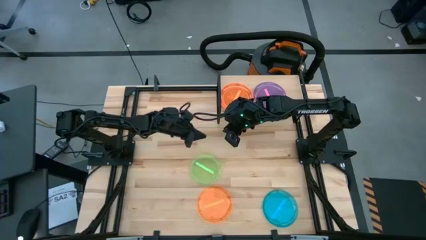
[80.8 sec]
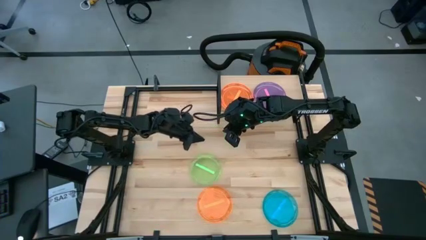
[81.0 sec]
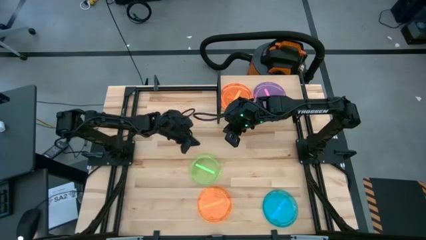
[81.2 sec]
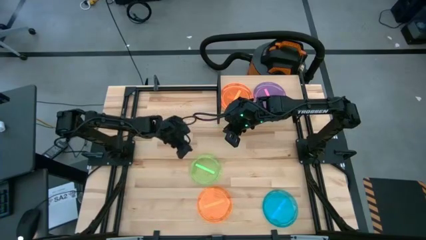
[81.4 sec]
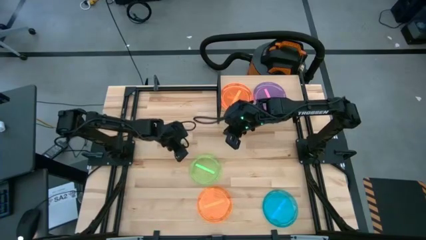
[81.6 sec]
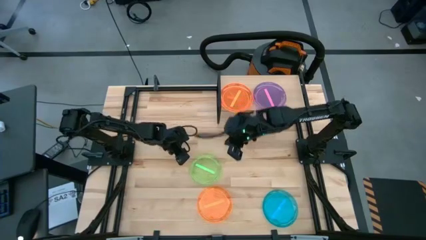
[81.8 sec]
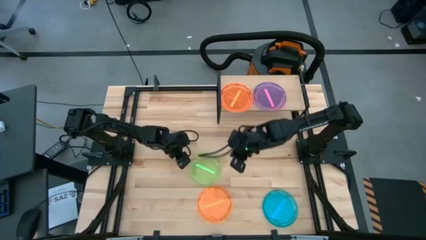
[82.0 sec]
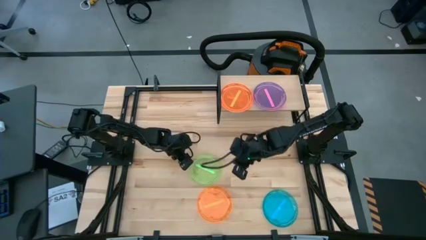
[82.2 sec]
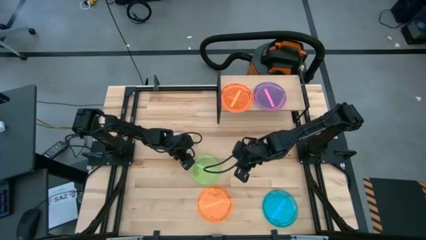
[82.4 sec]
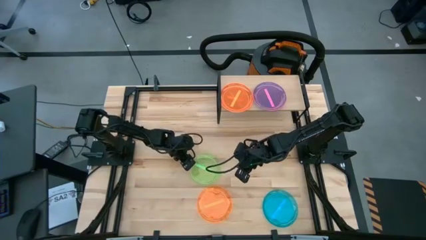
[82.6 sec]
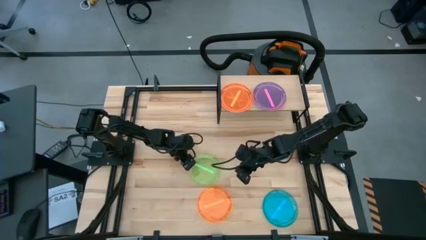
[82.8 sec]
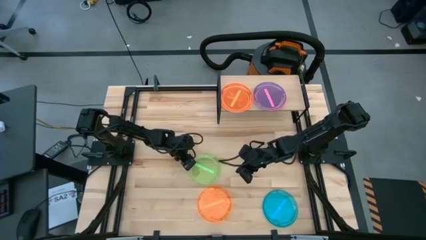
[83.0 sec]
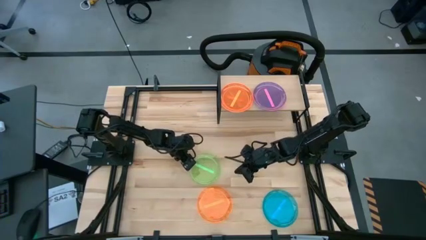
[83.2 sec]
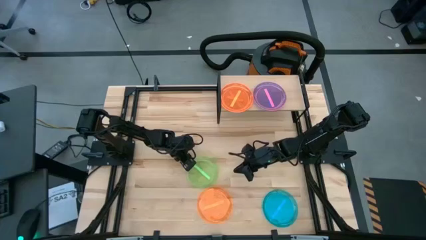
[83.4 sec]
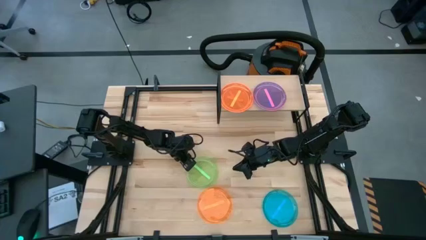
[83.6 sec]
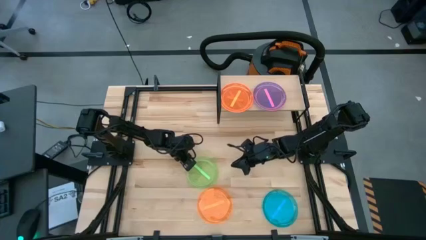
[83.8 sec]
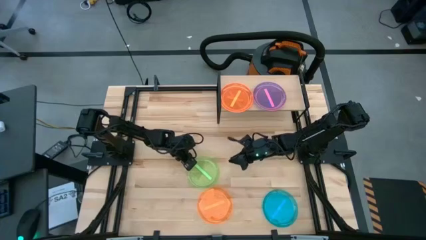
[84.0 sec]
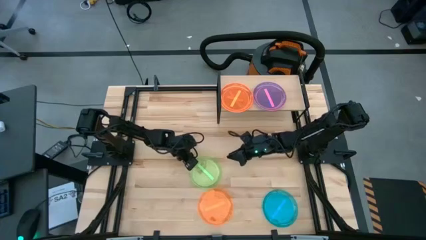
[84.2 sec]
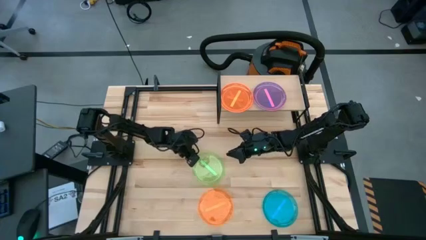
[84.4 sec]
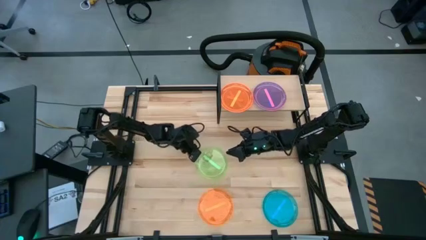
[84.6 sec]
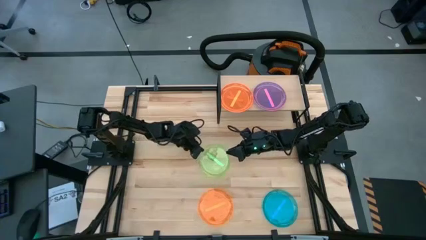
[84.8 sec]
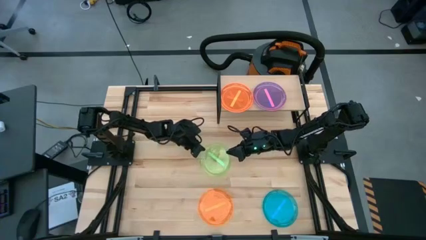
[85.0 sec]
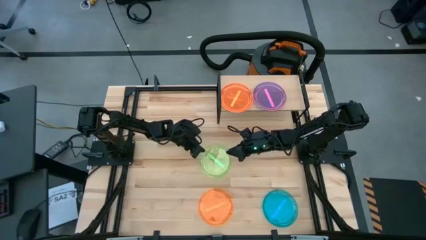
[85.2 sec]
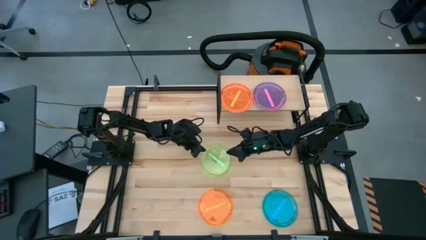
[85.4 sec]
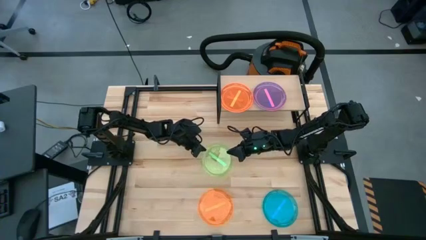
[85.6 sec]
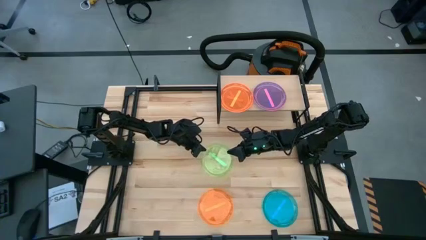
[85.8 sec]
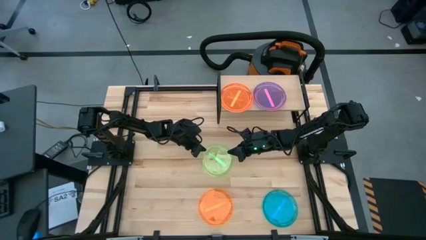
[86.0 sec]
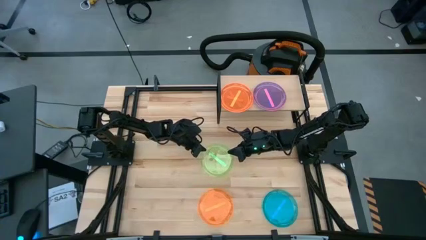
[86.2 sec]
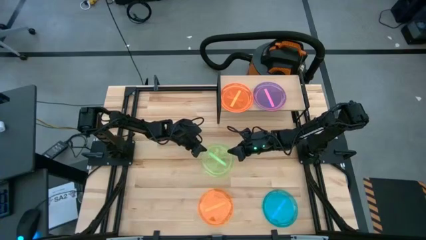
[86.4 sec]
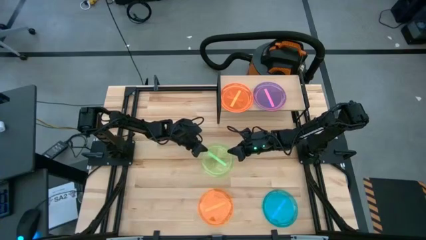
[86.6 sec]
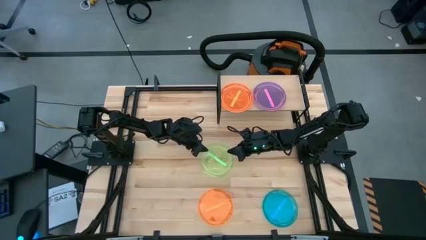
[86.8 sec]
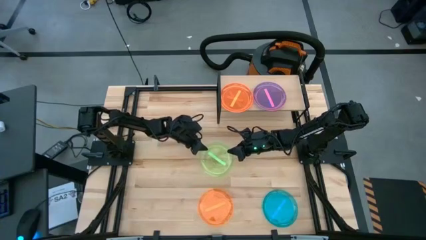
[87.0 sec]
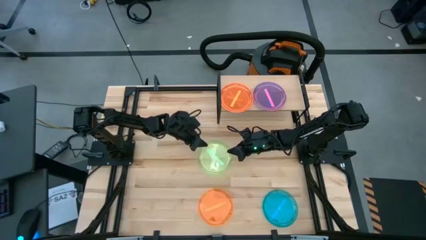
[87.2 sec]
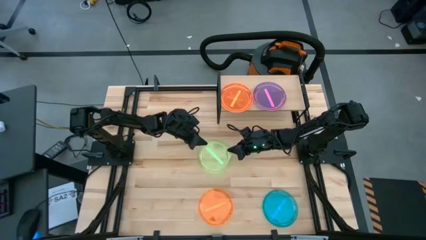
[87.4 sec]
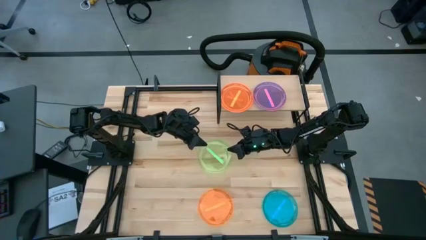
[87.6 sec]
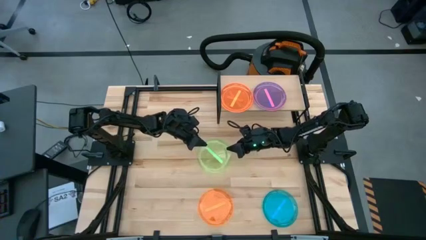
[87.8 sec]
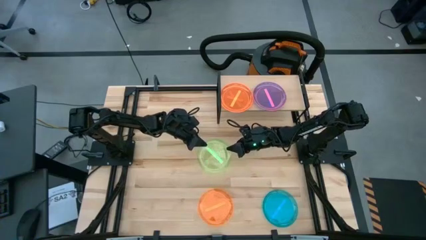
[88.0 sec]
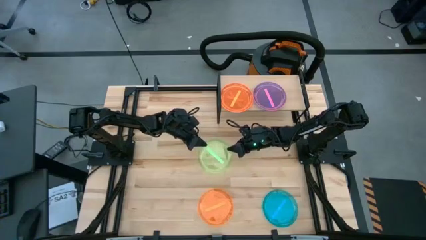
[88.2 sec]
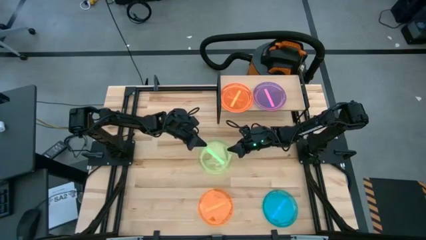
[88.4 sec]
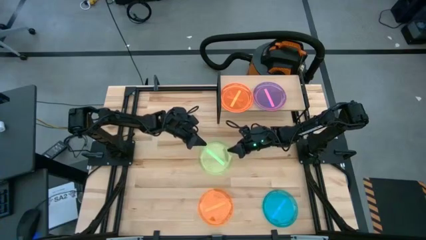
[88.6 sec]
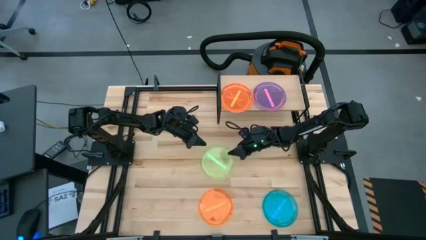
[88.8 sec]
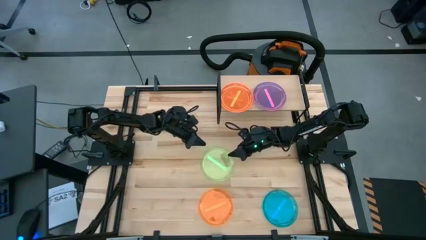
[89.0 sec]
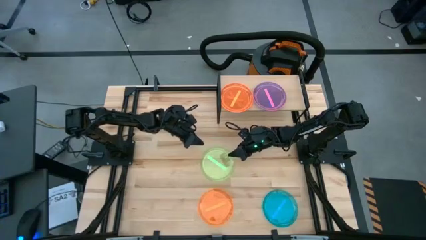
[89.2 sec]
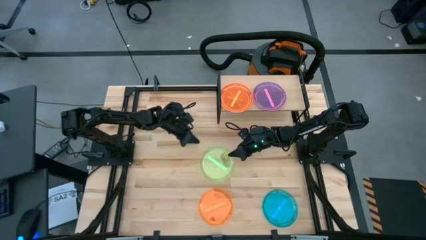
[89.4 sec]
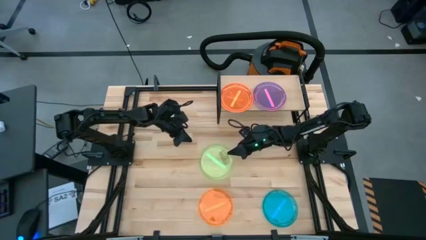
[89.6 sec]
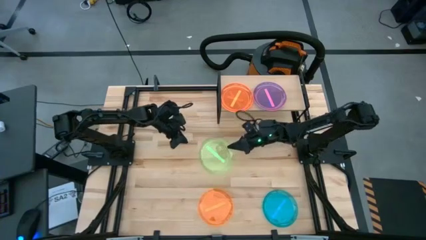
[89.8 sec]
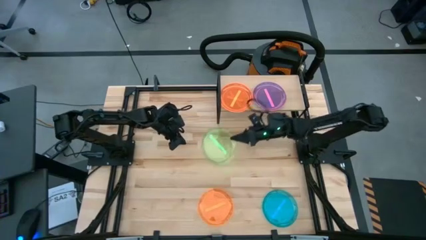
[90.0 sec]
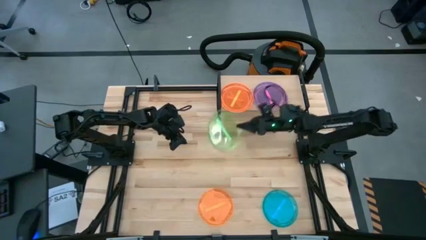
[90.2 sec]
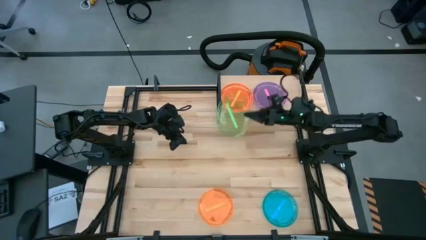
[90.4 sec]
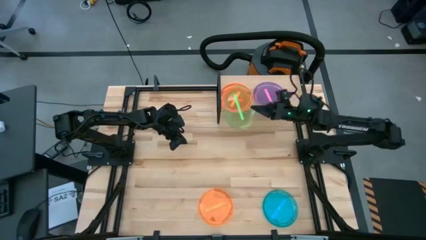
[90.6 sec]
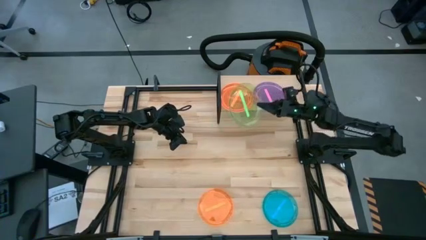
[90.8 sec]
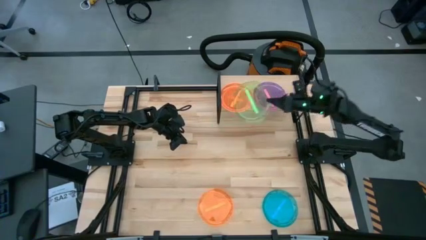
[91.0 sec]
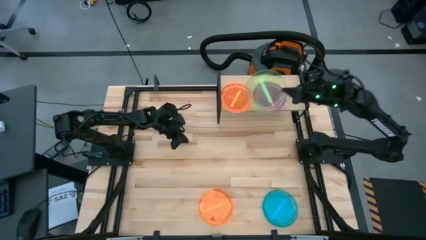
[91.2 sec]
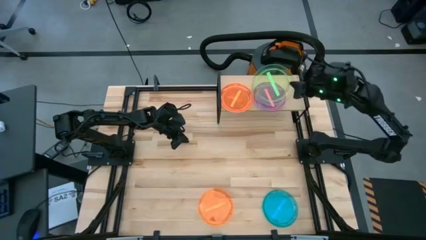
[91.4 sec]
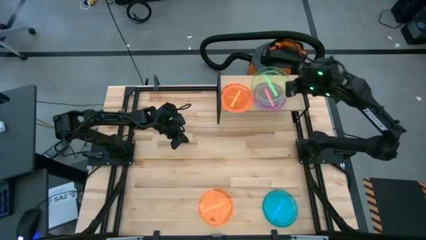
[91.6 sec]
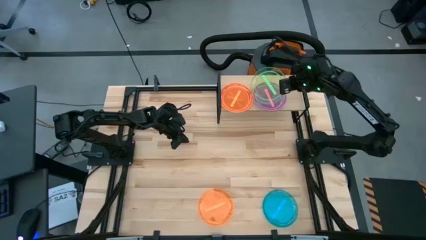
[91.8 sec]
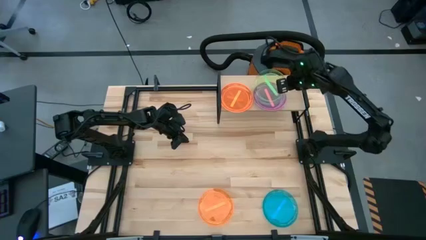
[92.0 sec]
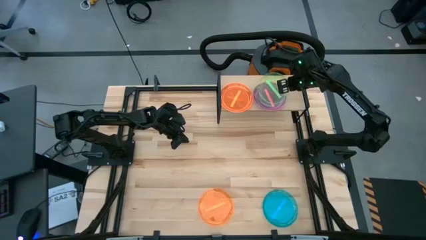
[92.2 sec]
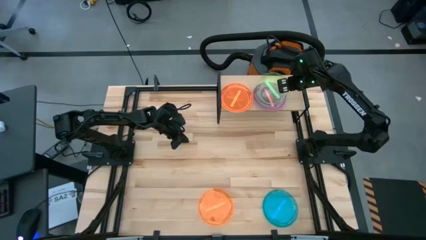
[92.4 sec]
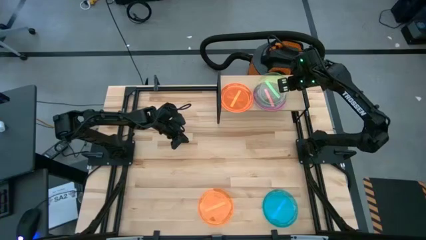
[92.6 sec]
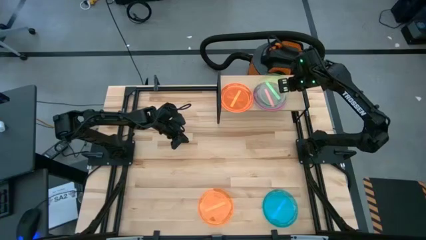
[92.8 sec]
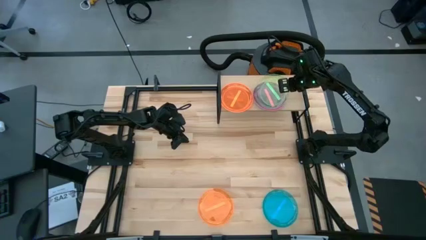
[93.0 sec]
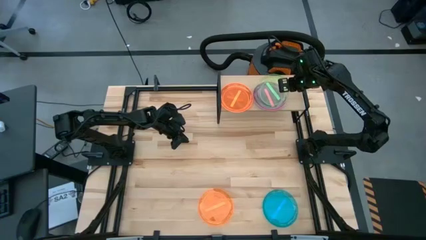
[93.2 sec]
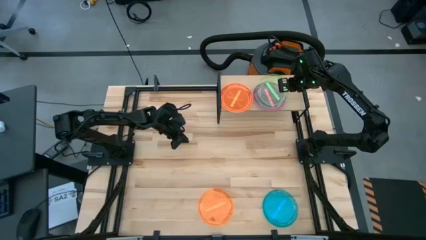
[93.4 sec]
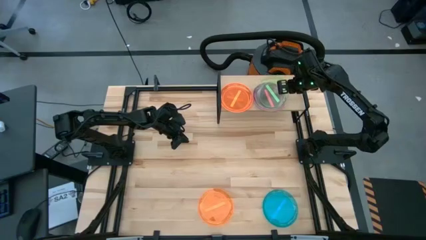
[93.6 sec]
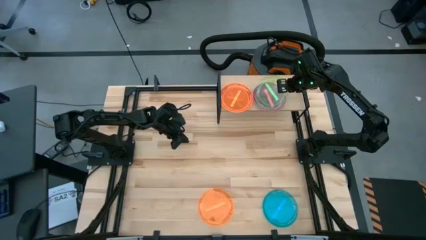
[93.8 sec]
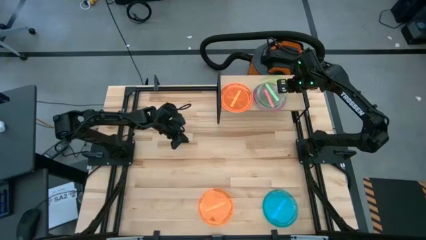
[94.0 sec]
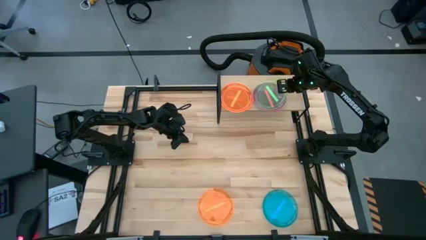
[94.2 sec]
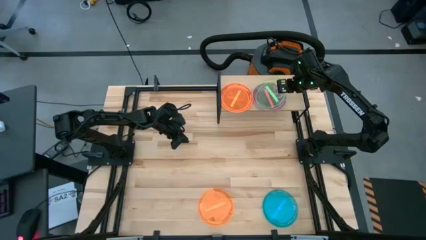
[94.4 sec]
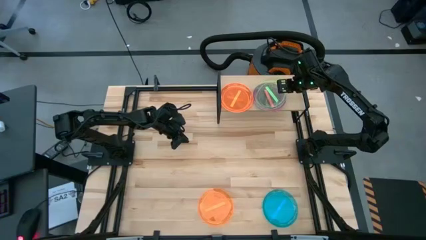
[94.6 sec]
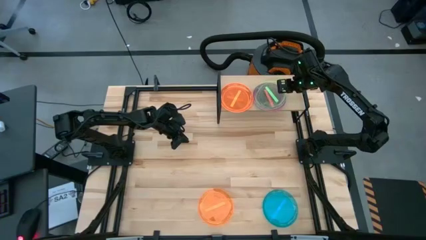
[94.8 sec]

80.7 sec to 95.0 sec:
Task: Place and stack plates onto a shelf
Stack the green plate on top of the pink plate on the shelf
